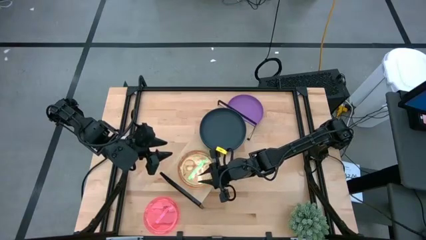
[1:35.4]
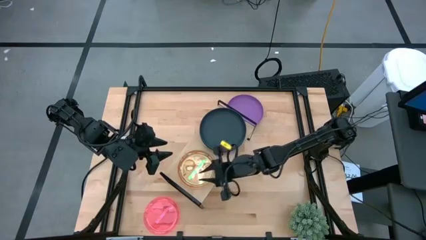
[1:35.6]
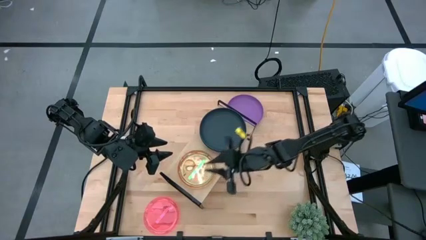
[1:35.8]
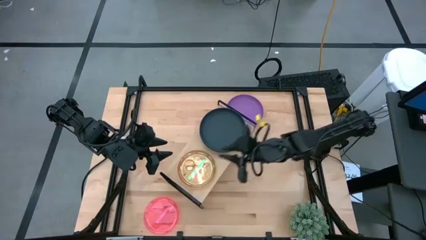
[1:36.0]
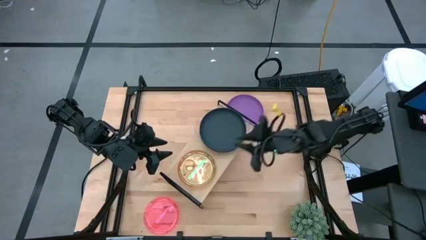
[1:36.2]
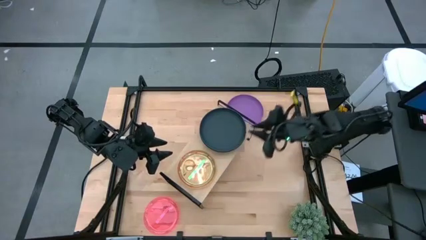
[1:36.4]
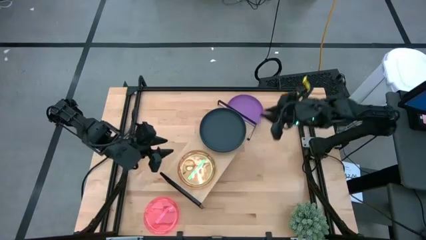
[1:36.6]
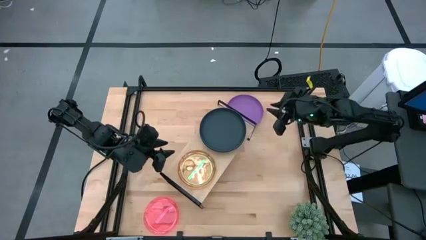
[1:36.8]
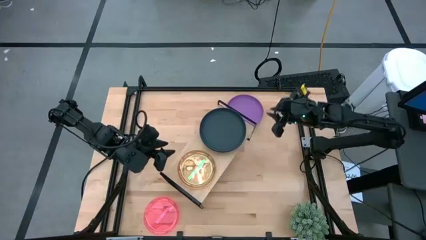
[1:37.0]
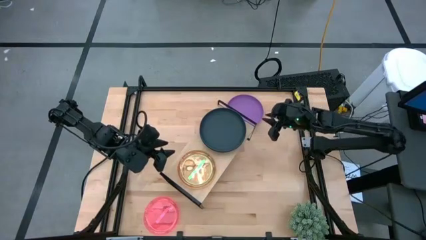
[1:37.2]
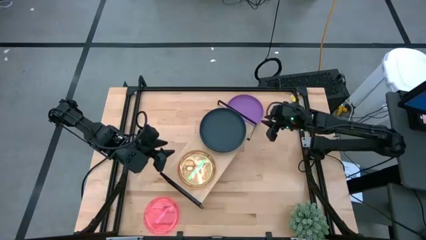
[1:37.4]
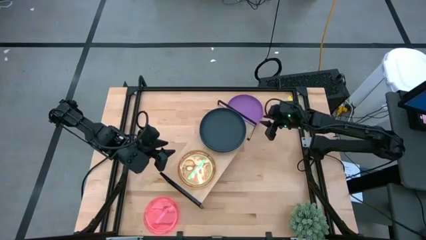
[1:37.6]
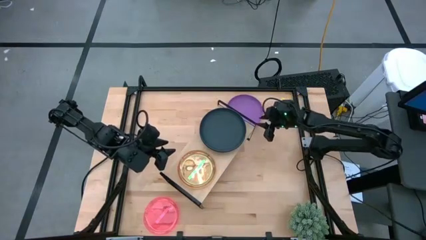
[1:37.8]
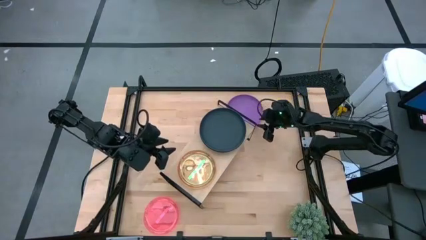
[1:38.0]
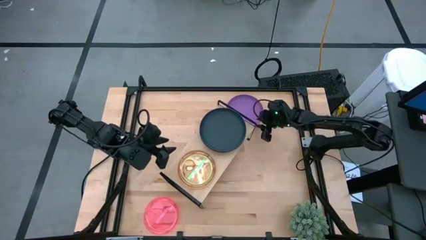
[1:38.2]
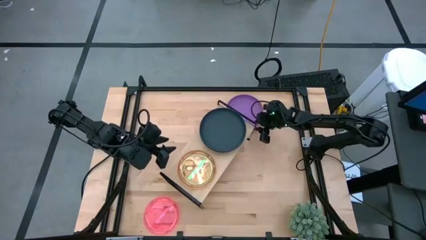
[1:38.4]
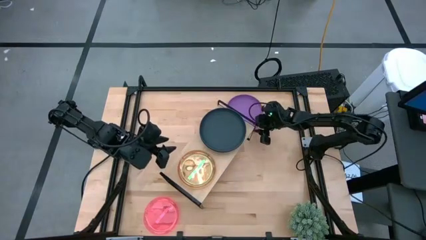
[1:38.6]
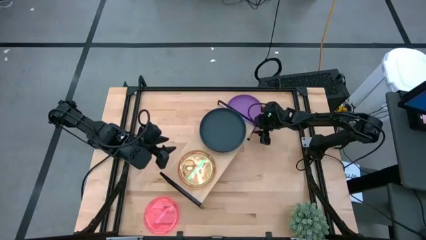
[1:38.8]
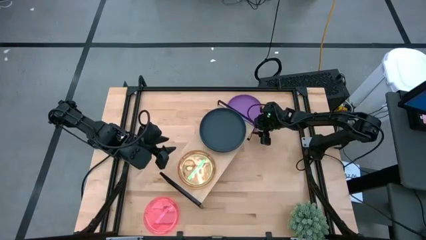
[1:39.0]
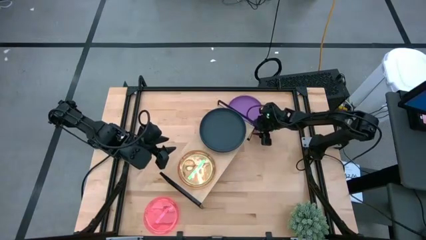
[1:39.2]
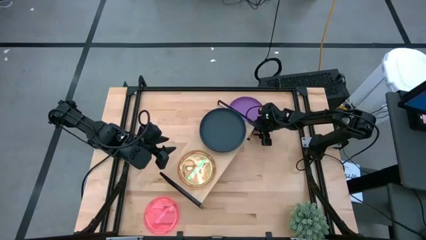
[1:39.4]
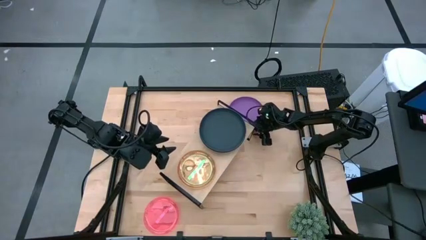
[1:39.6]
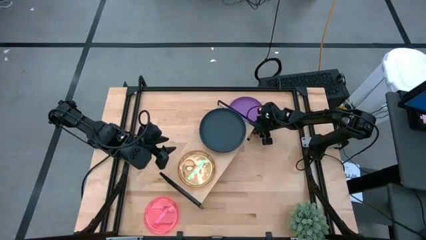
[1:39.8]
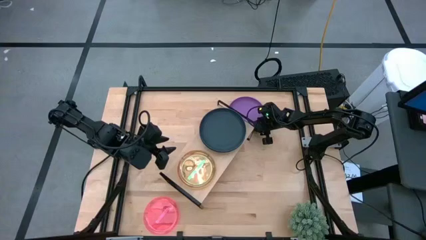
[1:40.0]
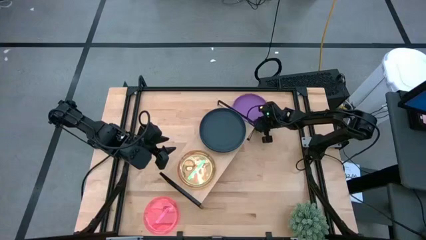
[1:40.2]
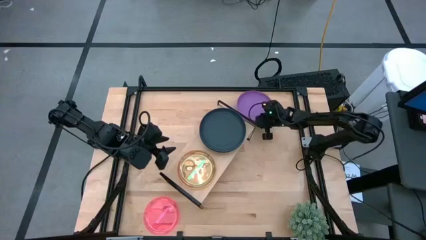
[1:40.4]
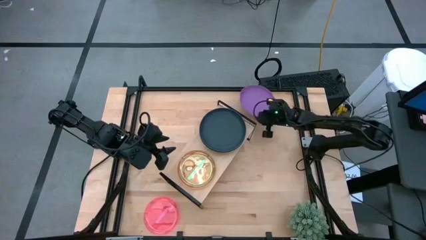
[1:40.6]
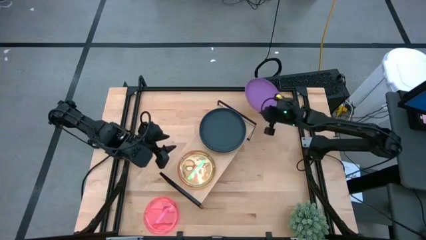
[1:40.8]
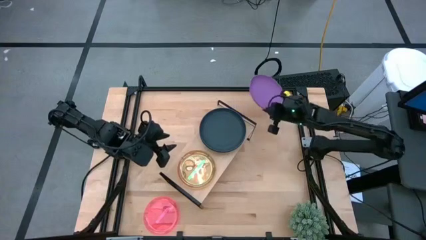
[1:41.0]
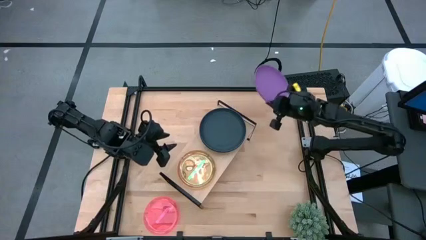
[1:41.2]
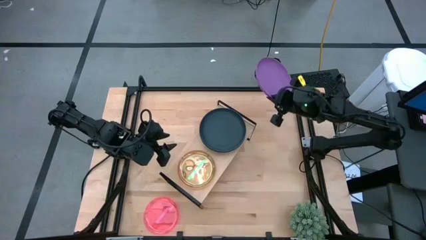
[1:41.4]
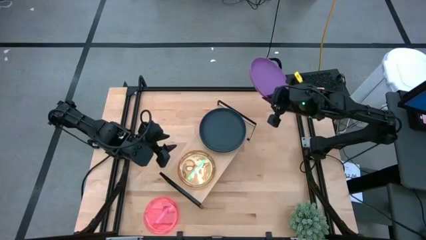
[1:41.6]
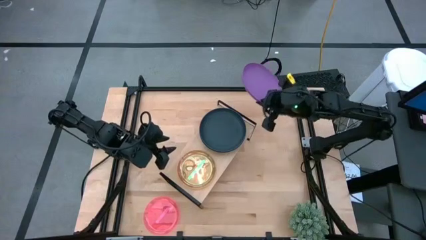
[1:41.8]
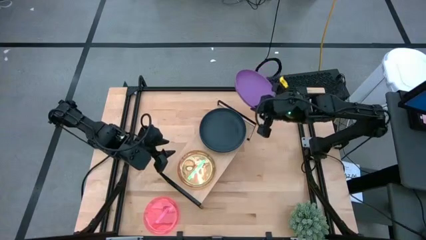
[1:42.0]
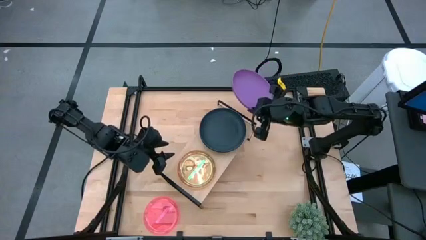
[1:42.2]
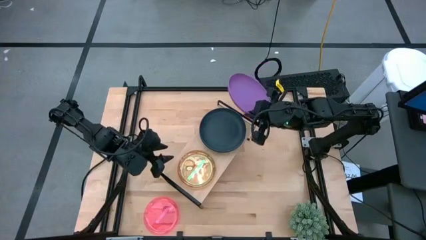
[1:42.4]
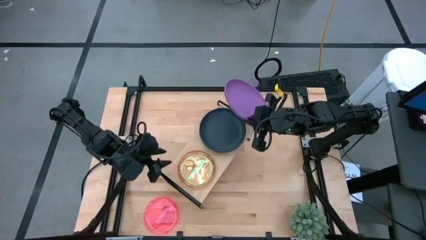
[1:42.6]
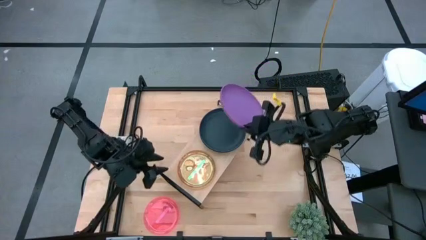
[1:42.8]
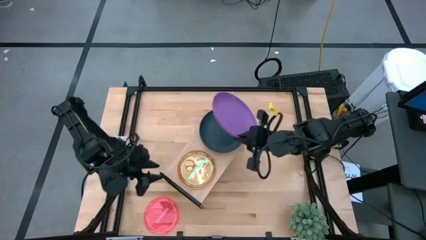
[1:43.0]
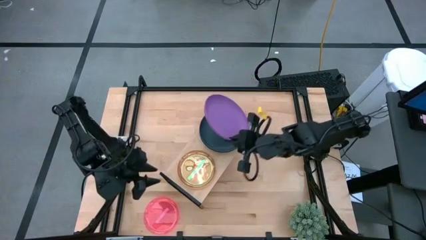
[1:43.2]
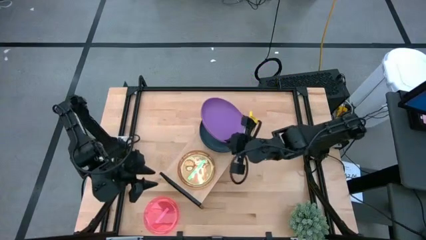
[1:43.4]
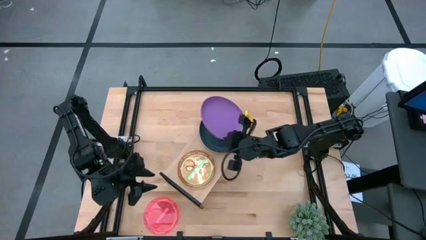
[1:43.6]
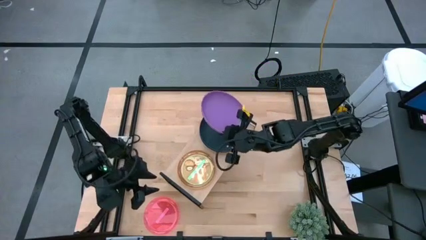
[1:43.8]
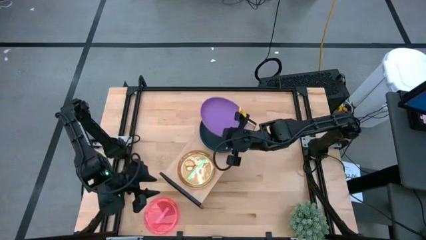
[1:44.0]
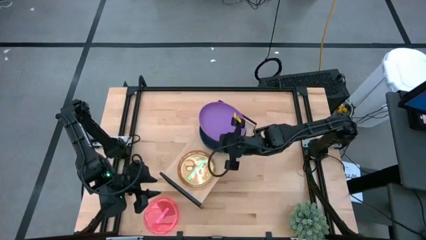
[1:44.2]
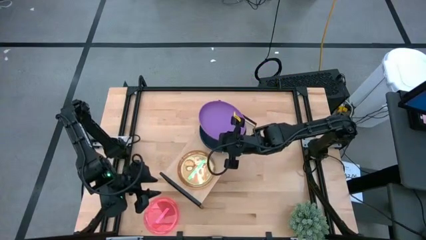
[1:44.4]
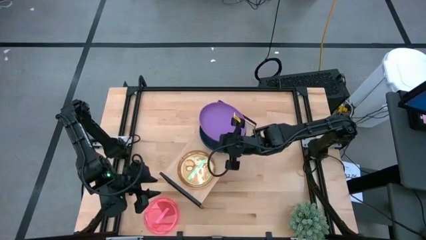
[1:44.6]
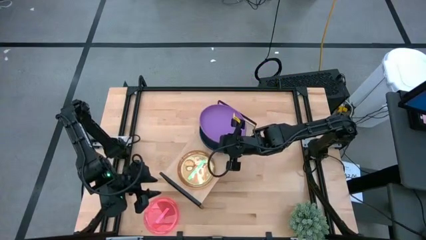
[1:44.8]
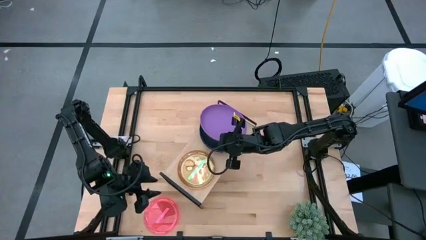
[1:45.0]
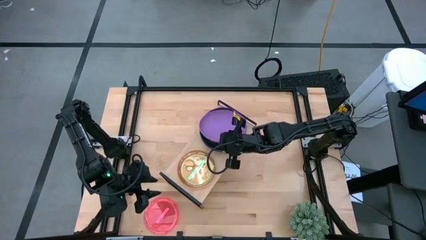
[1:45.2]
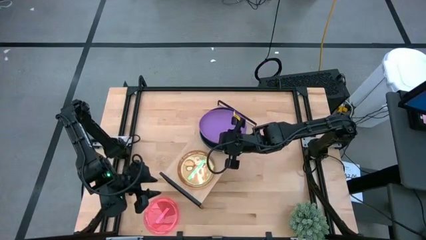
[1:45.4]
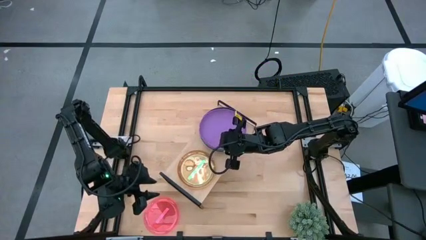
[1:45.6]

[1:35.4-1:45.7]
Task: Place and stack plates onto a shelf
Stack the purple plate on top of the black plate on the shelf

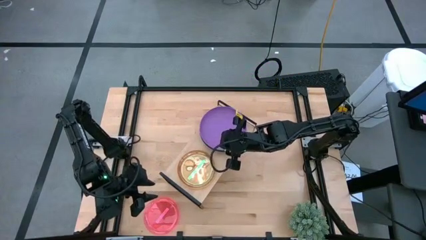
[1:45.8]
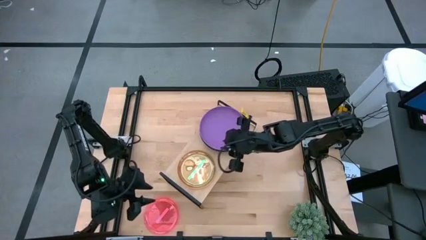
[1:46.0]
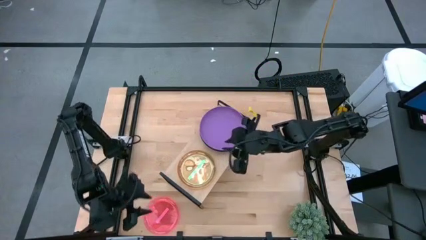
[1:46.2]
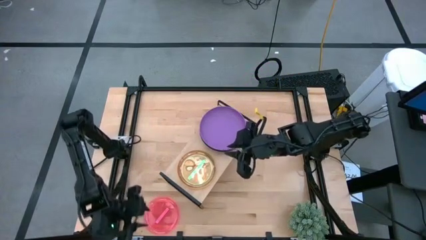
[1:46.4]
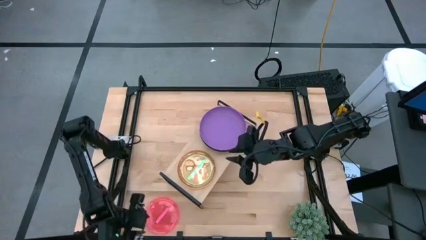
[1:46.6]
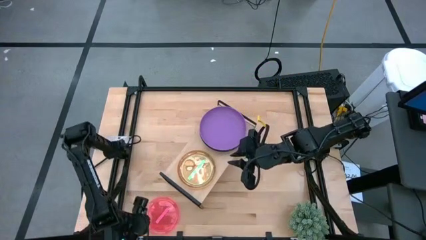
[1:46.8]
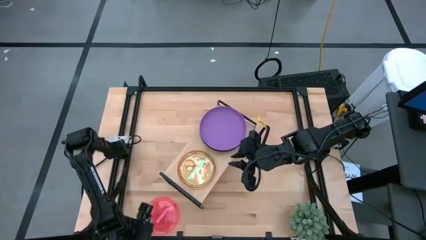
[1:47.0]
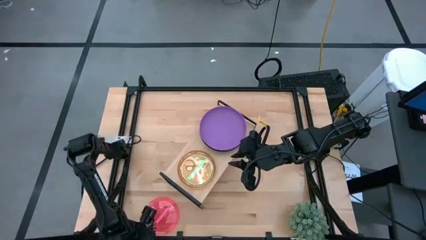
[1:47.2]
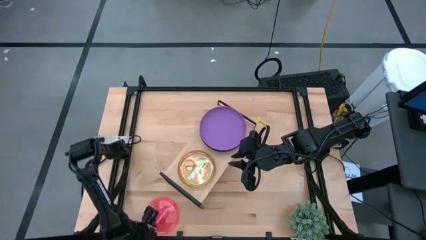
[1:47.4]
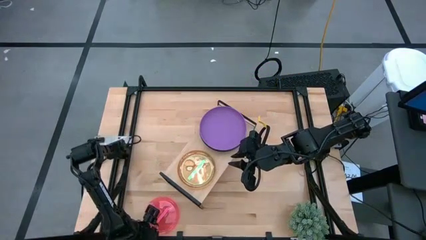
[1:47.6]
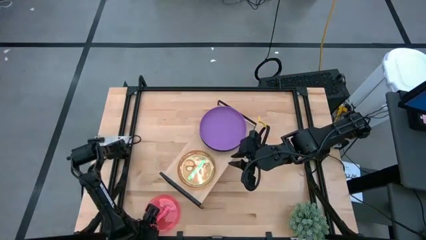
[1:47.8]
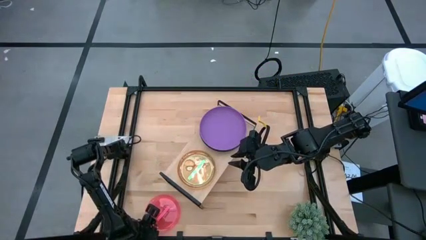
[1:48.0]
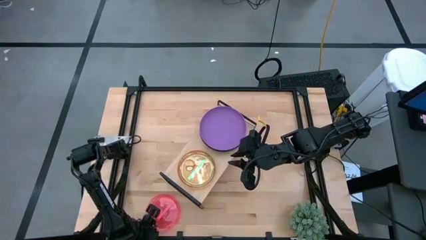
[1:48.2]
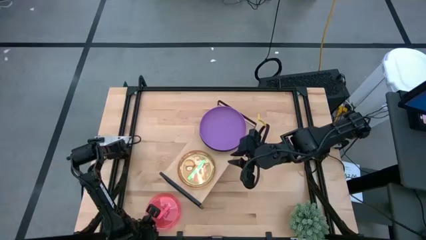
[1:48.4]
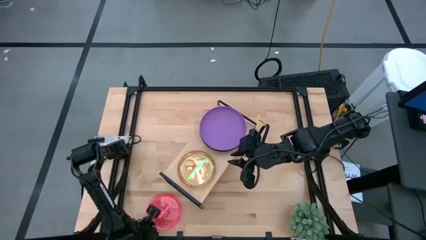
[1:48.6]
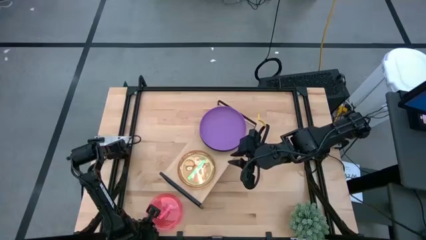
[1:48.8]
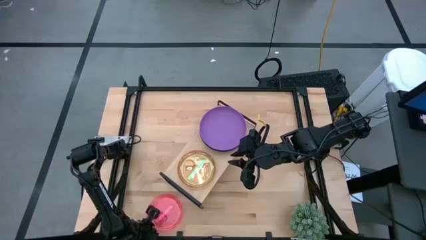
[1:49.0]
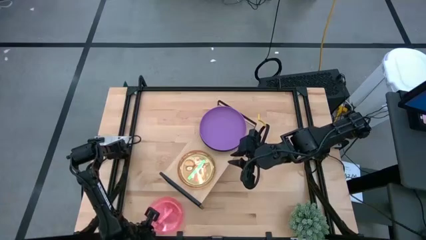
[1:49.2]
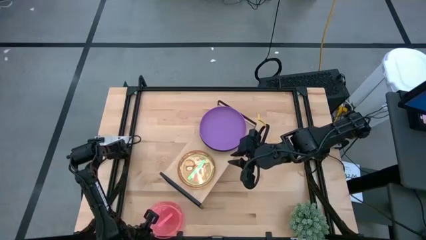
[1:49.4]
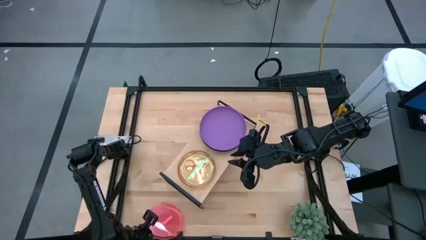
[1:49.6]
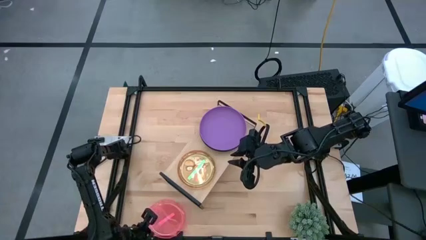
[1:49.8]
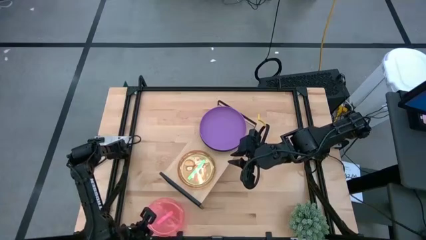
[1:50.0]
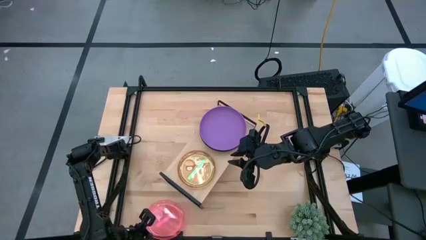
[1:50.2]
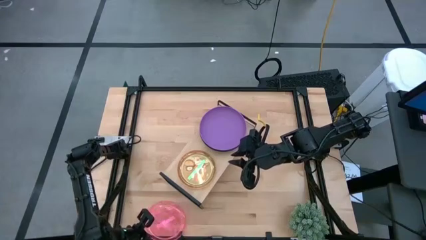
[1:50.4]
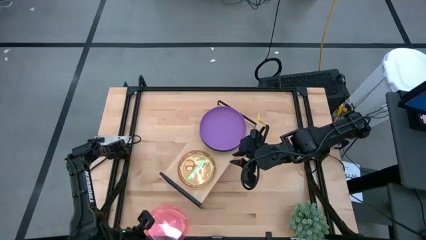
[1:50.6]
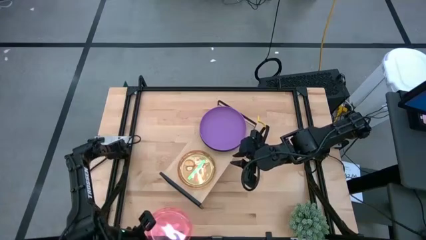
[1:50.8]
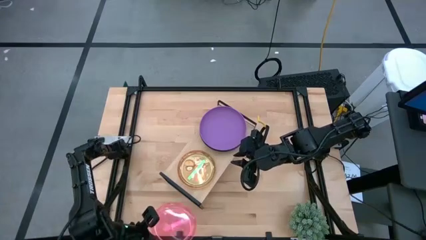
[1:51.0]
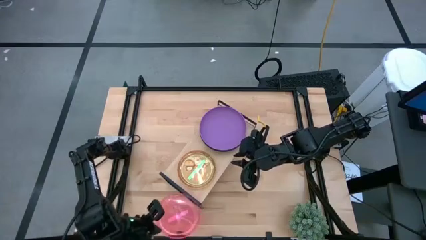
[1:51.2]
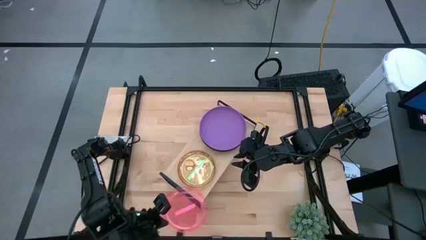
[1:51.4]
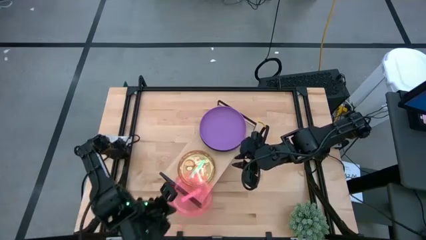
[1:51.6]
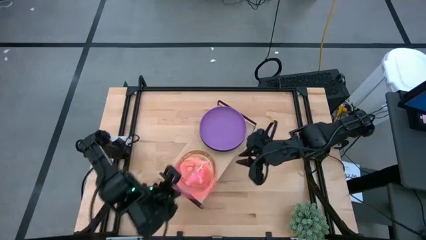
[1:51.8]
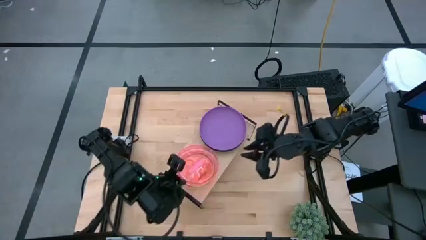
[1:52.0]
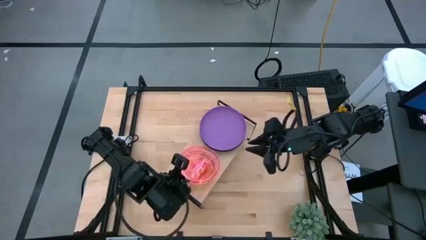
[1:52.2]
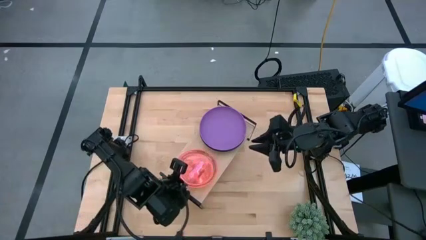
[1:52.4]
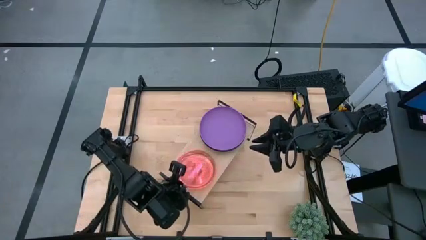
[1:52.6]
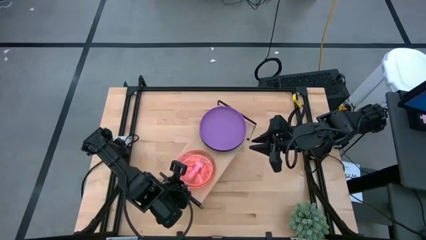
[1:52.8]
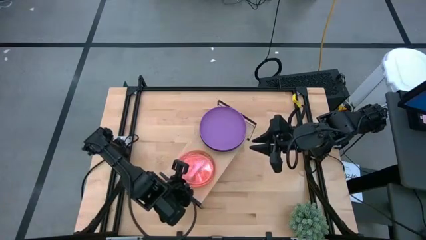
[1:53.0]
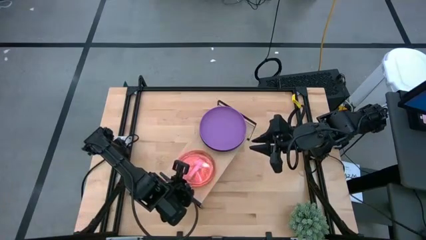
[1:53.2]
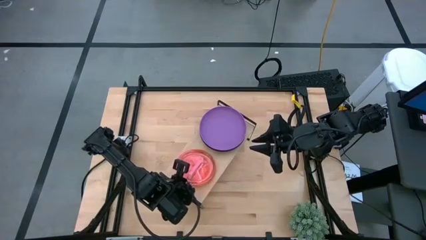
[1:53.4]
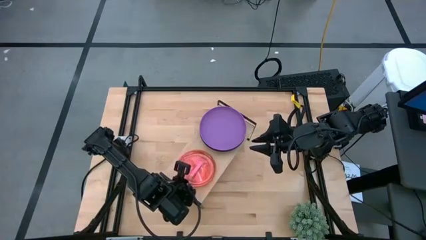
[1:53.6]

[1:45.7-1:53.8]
Stack the pink plate on top of the green plate on the shelf
